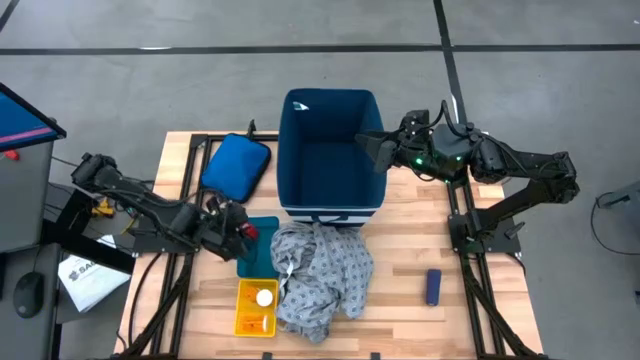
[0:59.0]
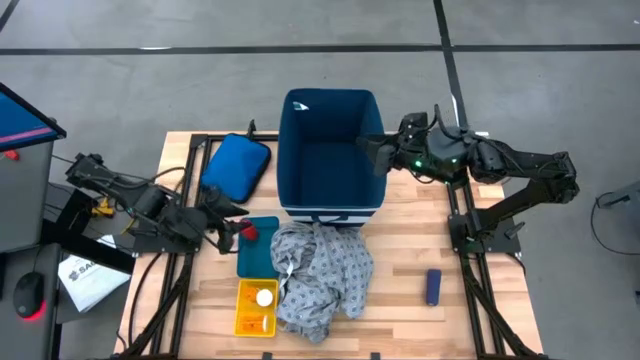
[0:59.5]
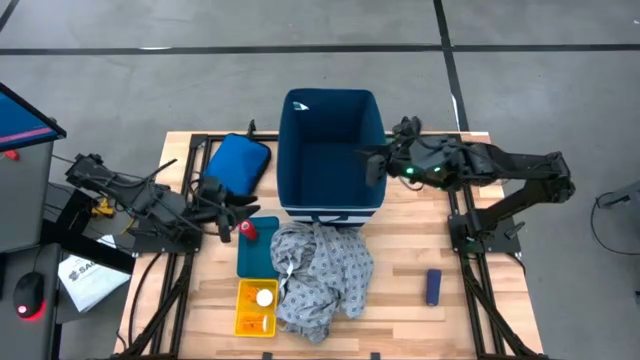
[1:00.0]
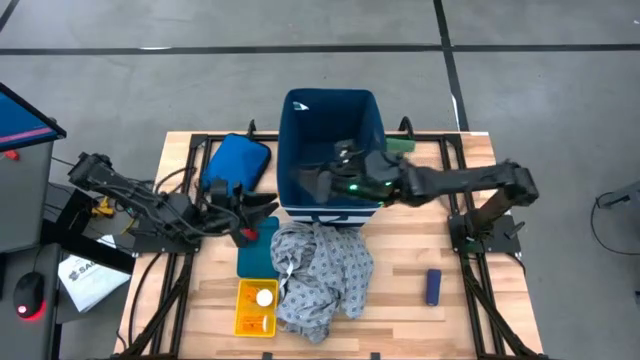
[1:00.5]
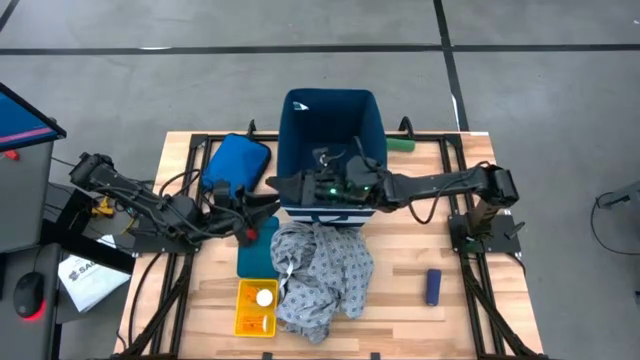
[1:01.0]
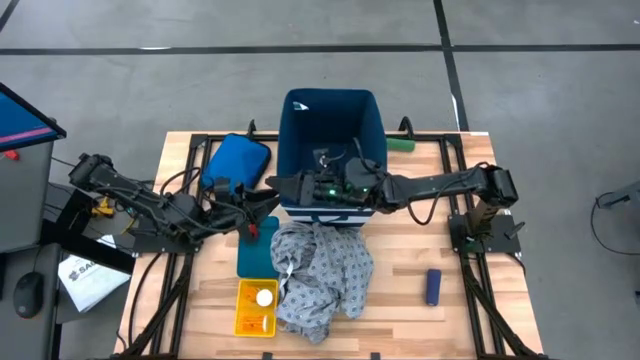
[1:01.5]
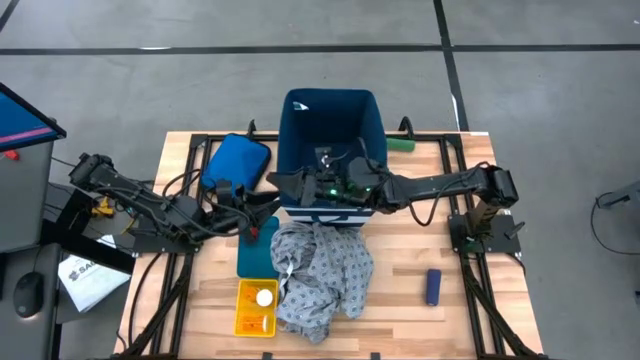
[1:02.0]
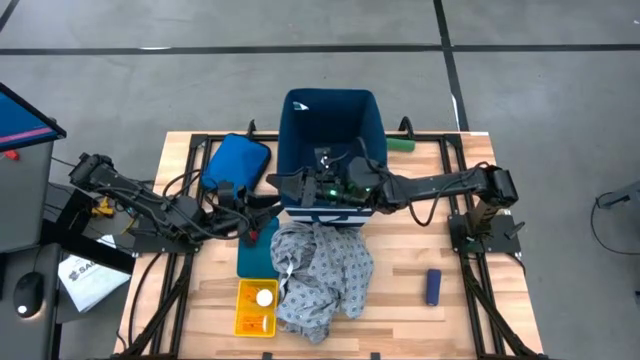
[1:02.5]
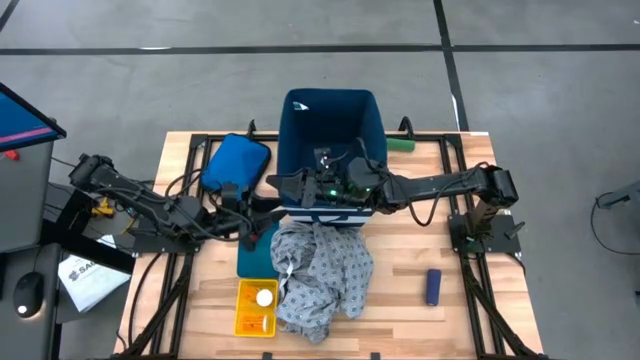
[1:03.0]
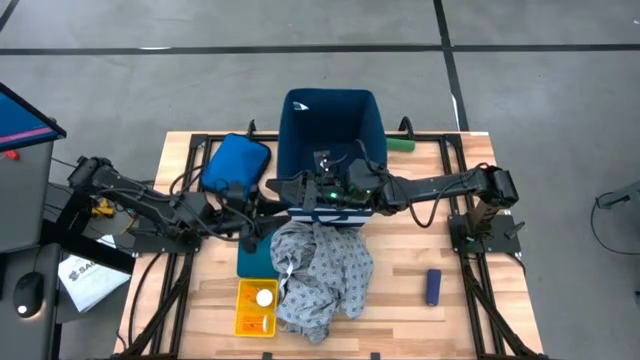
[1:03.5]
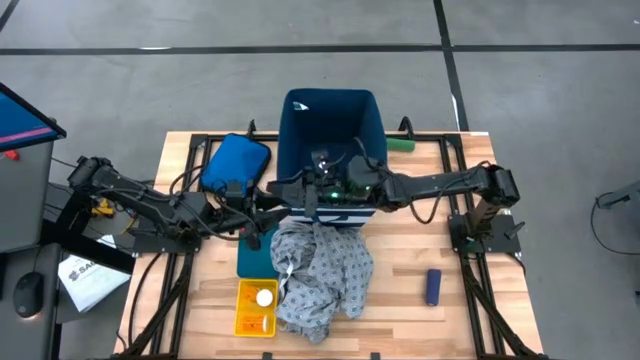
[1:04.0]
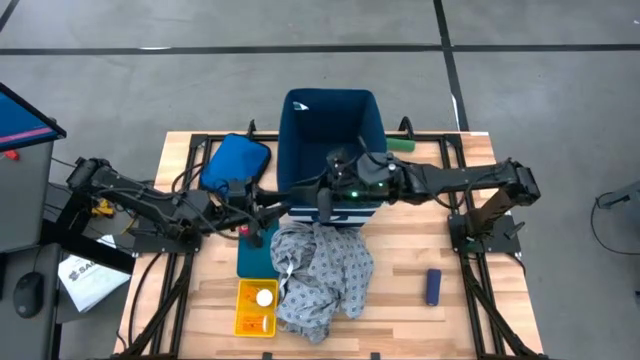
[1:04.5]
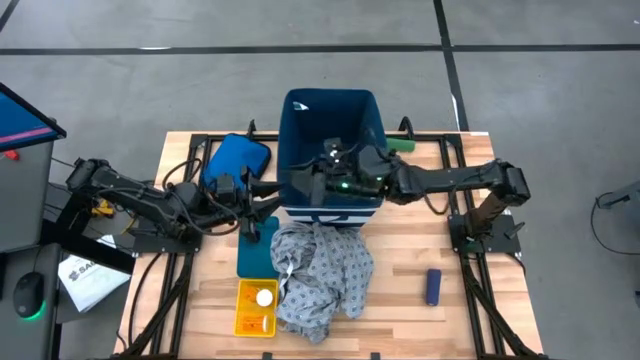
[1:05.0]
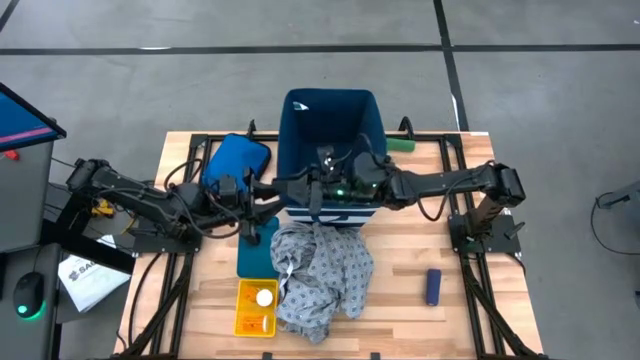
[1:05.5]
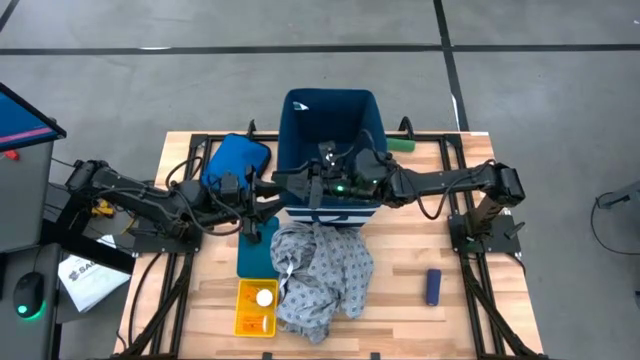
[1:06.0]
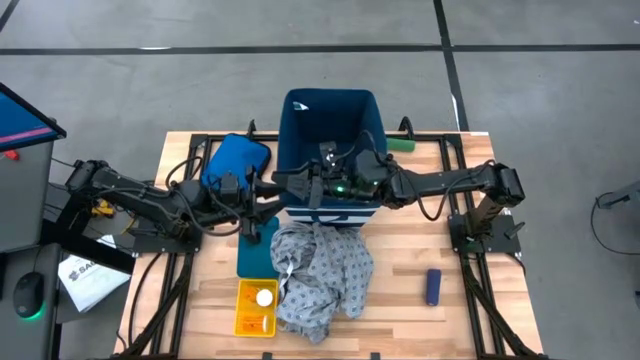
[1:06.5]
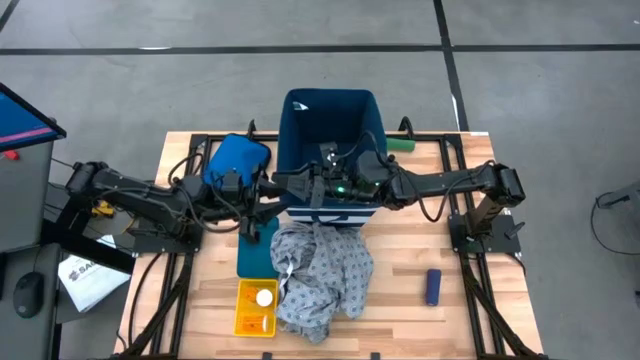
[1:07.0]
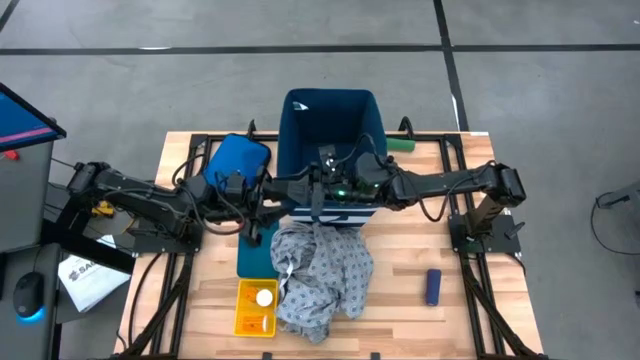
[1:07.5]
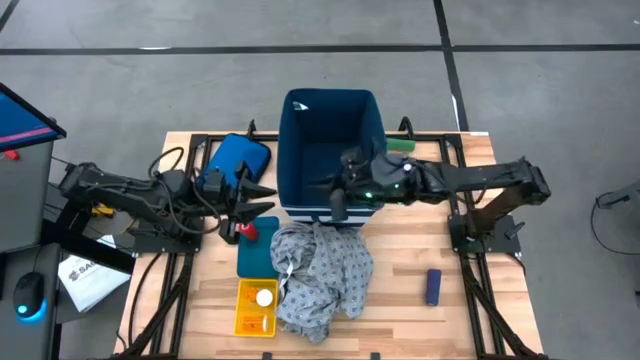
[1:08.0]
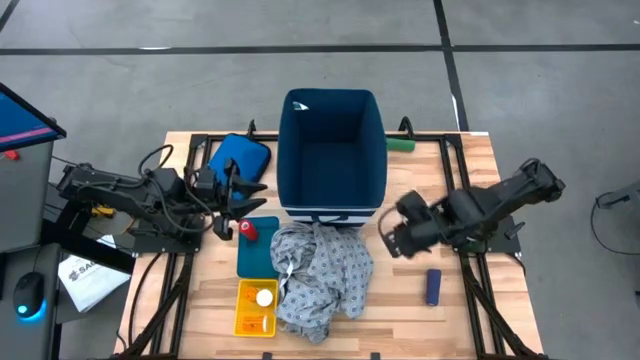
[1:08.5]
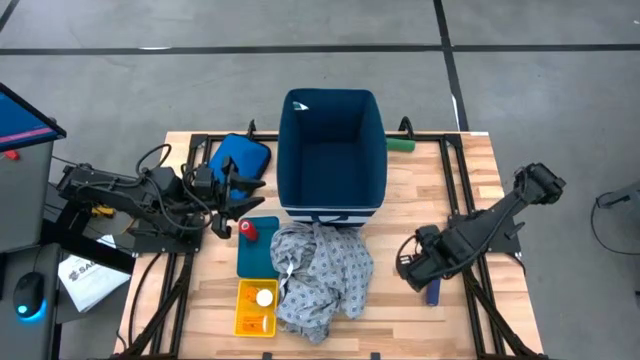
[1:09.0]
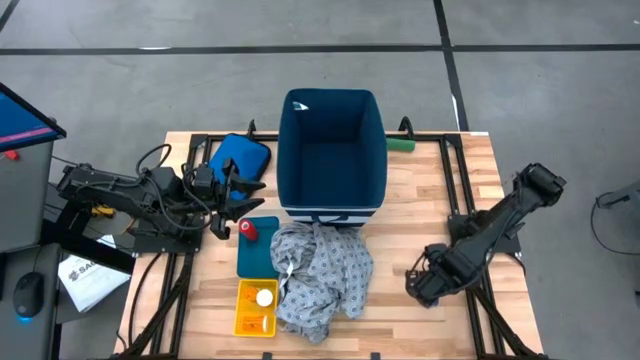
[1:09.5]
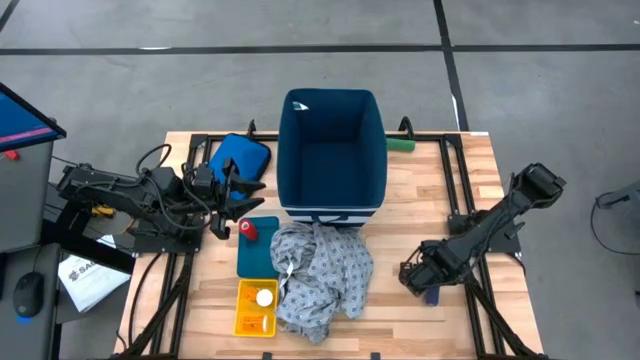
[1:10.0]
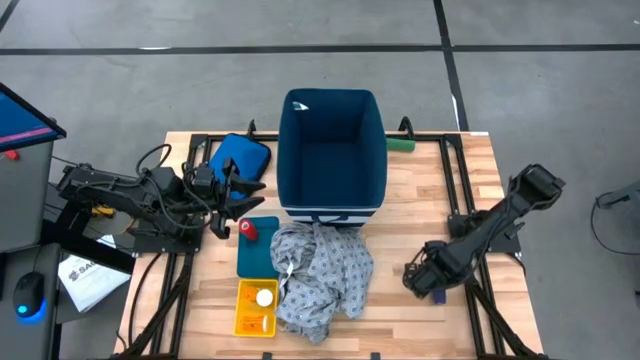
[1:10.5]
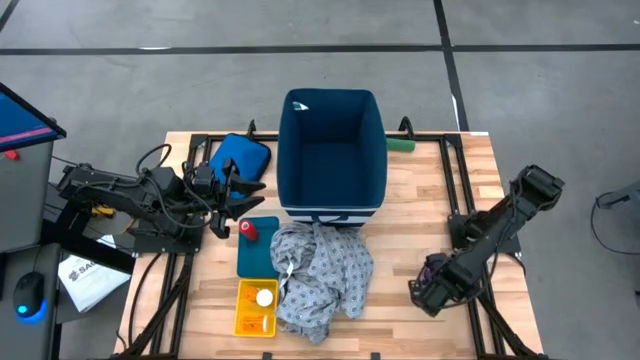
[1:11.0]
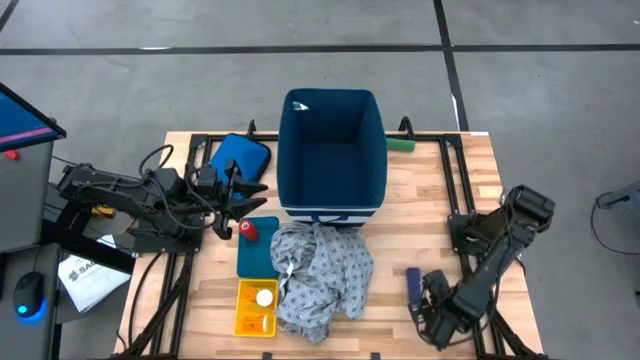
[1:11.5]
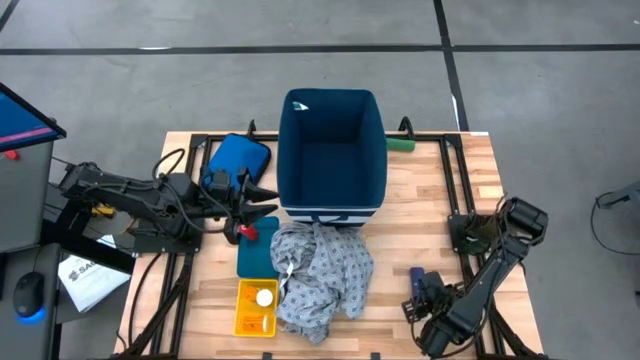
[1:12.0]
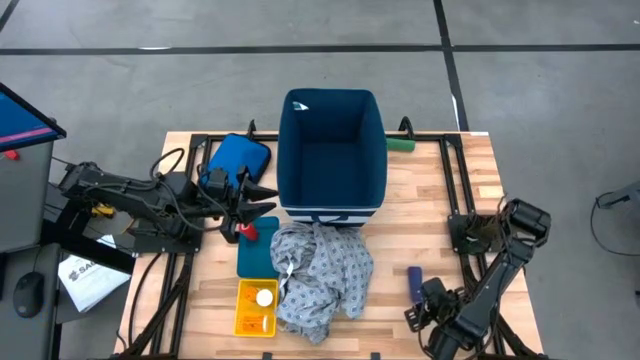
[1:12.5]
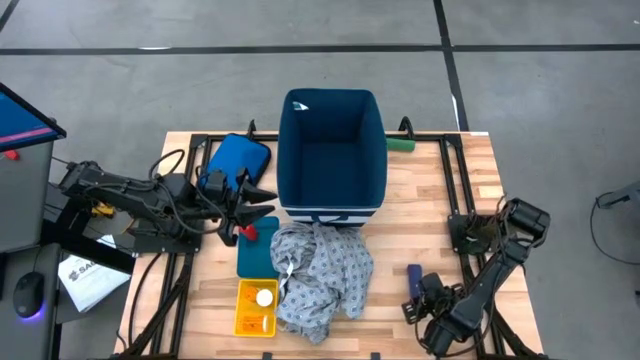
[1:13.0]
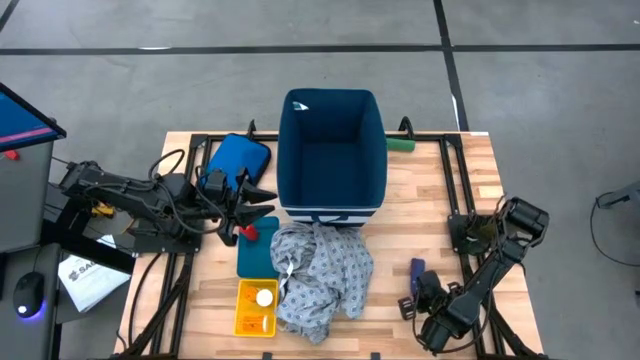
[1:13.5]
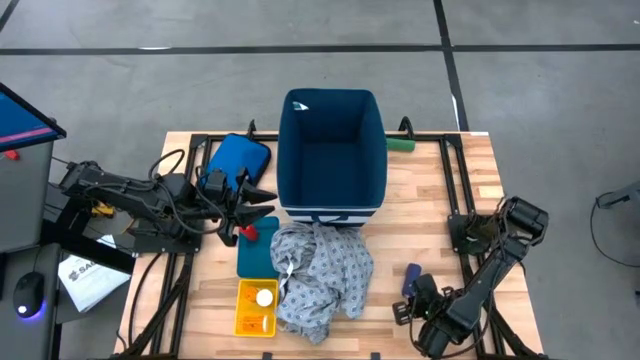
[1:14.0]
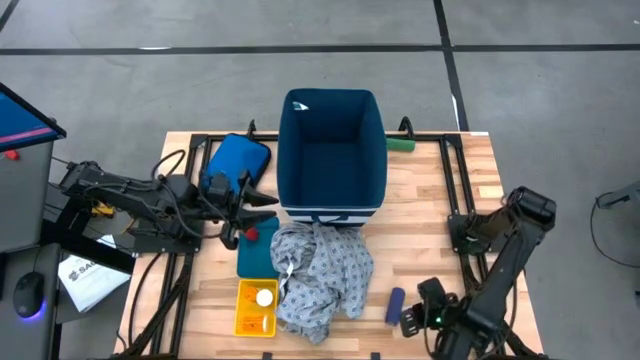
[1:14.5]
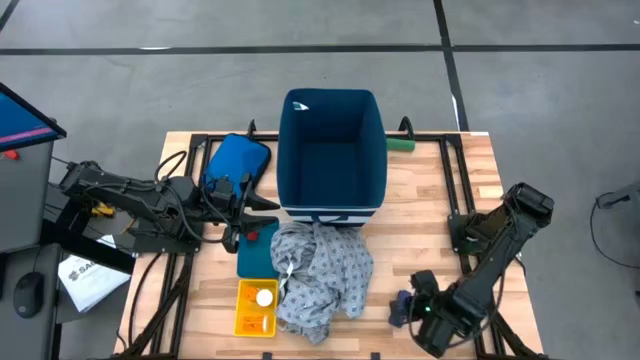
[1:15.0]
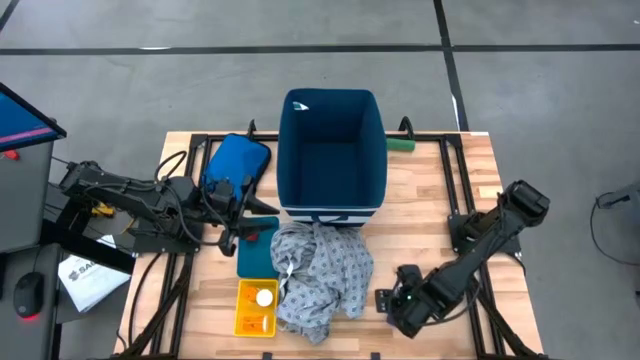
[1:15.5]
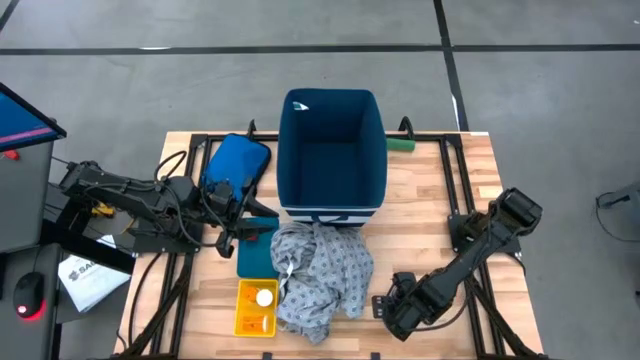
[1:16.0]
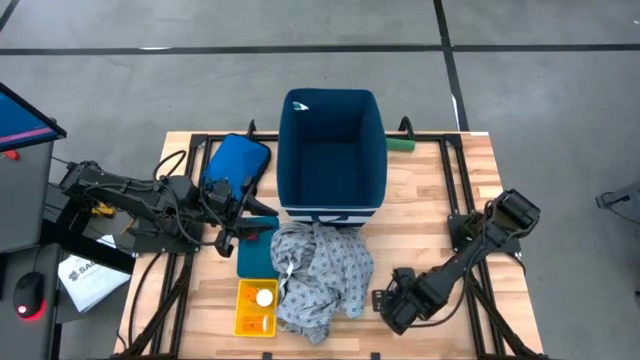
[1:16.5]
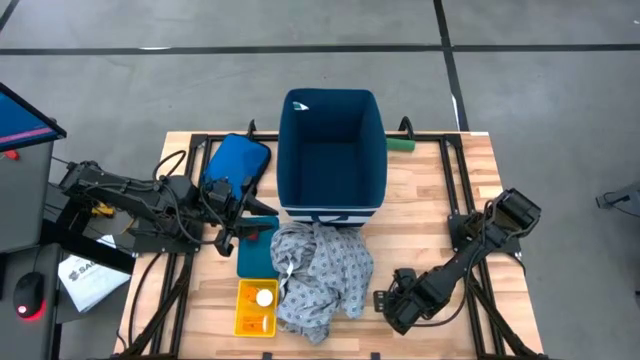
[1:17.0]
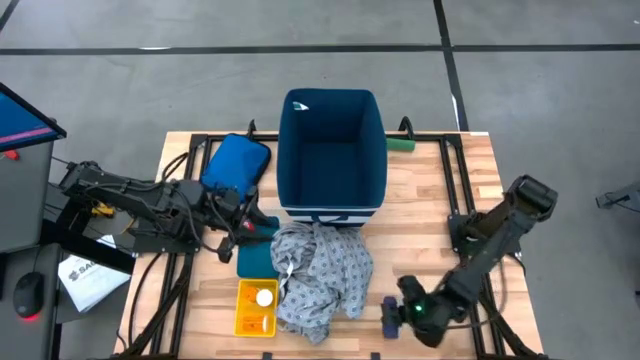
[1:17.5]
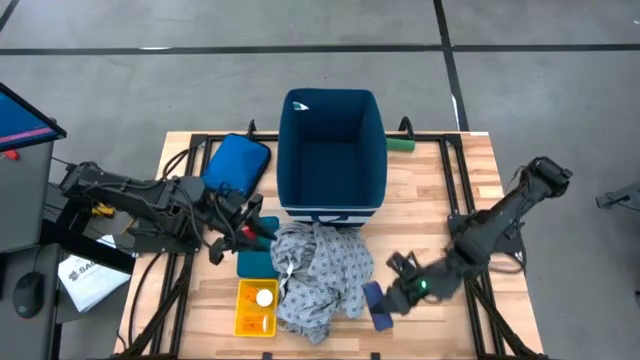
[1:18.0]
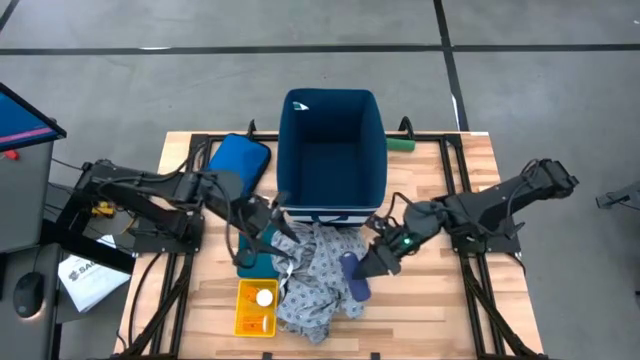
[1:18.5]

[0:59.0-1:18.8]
Task: Pick & place medical supplies in basket/bin
Put the blue bandage into the blue bin

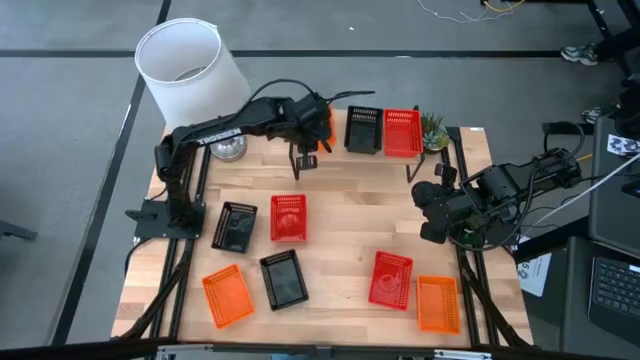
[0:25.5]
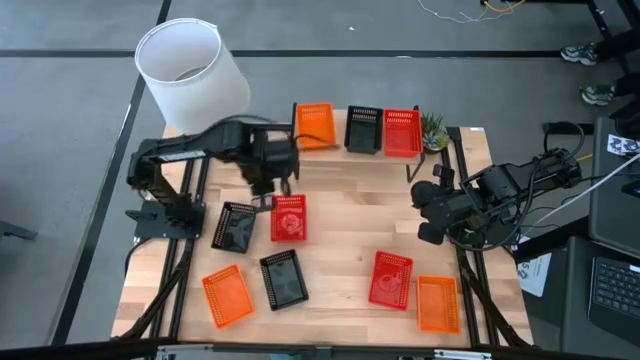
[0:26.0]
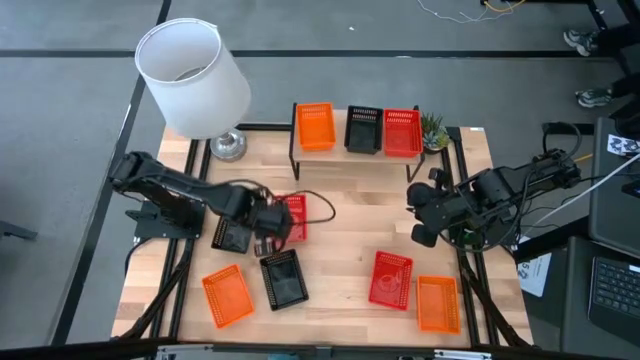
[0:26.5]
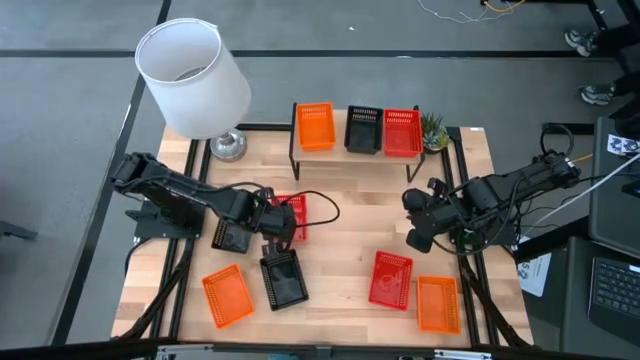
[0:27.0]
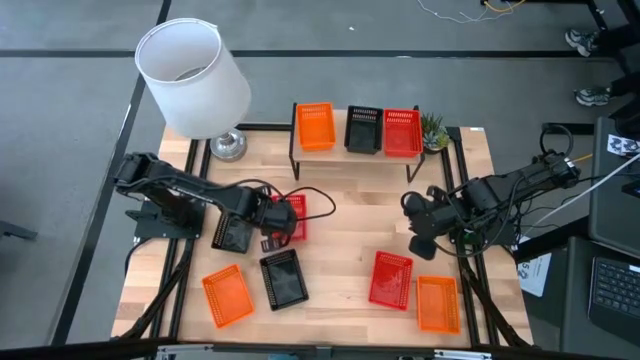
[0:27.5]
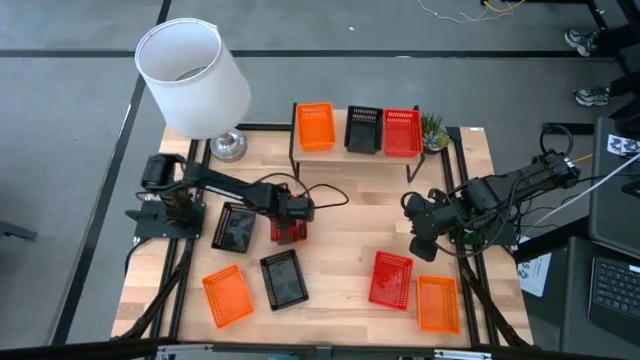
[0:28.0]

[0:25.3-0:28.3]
Task: Stack baskets on shelf by color
Move the left red basket to the middle of the table
